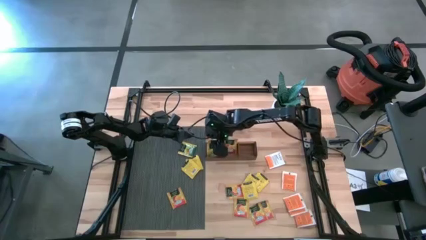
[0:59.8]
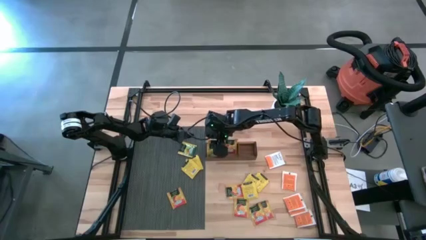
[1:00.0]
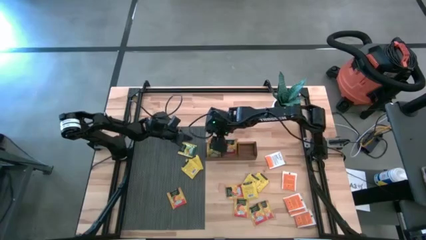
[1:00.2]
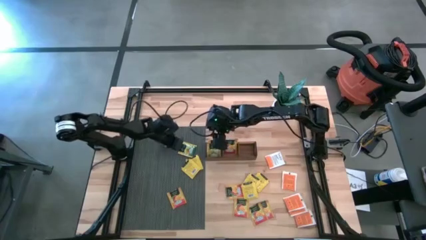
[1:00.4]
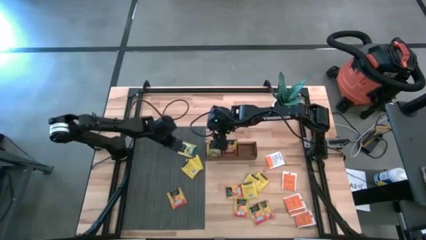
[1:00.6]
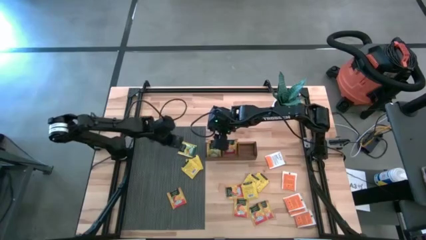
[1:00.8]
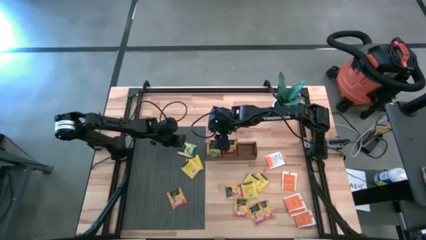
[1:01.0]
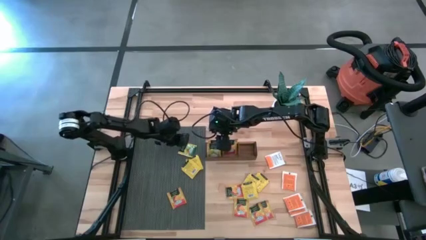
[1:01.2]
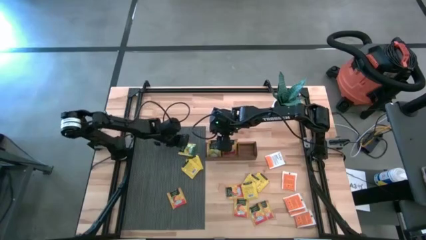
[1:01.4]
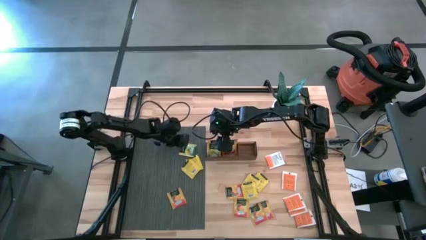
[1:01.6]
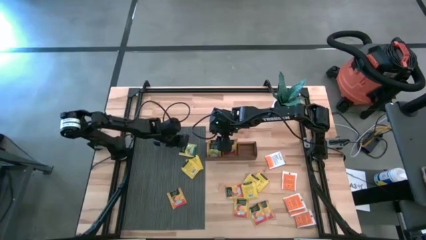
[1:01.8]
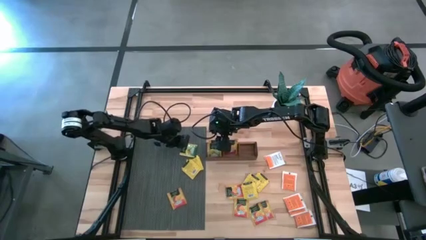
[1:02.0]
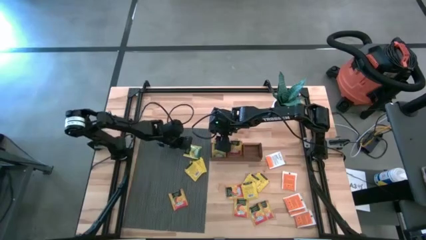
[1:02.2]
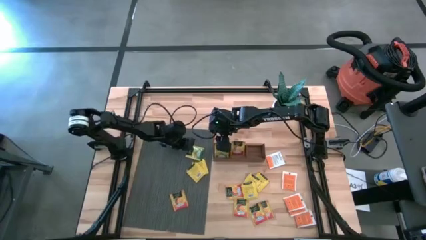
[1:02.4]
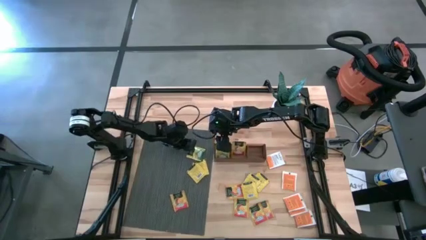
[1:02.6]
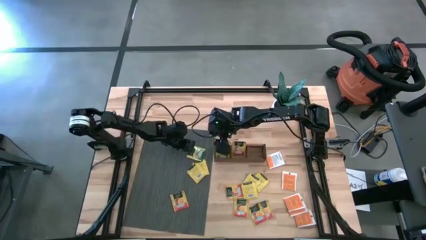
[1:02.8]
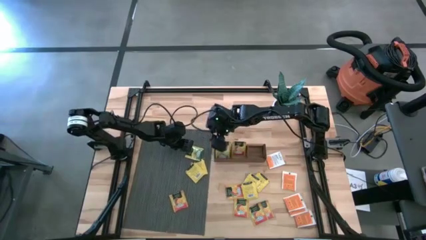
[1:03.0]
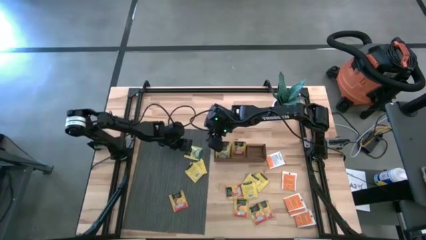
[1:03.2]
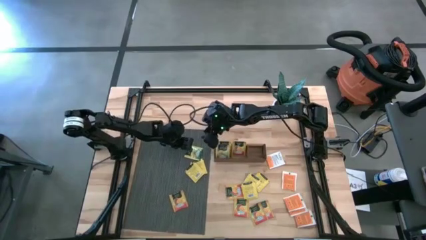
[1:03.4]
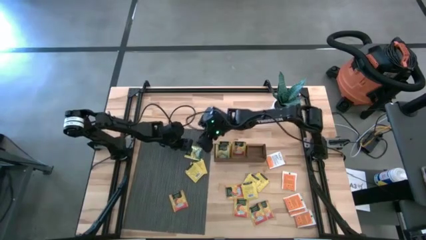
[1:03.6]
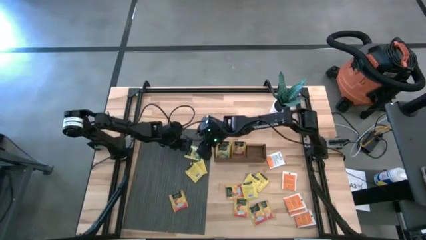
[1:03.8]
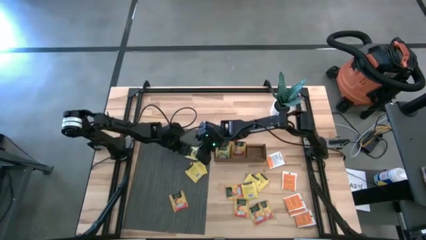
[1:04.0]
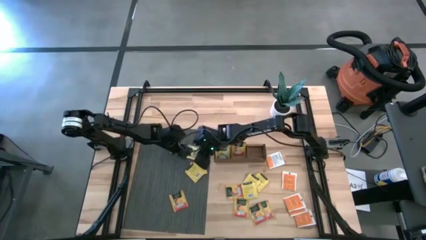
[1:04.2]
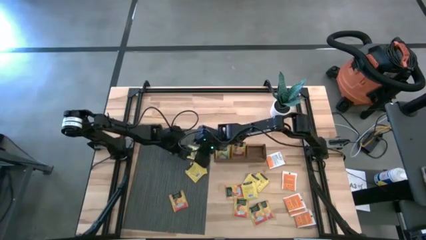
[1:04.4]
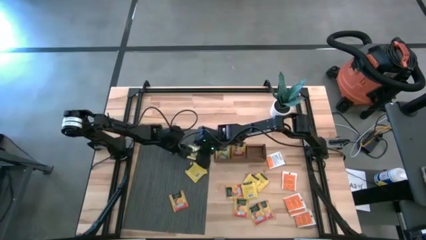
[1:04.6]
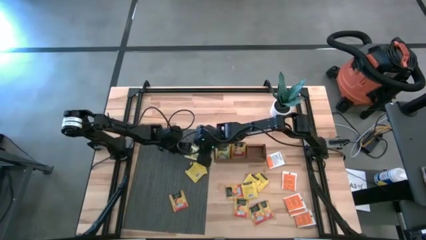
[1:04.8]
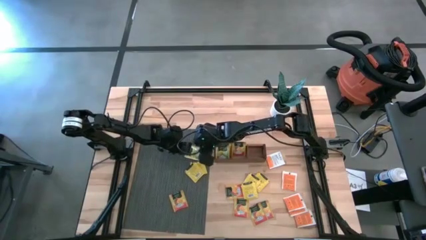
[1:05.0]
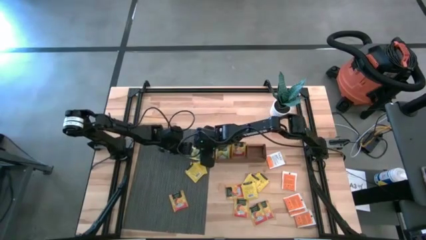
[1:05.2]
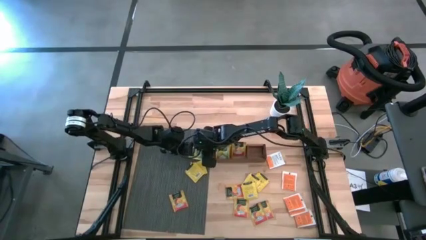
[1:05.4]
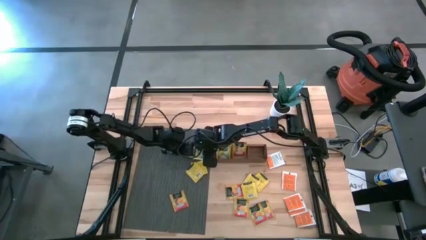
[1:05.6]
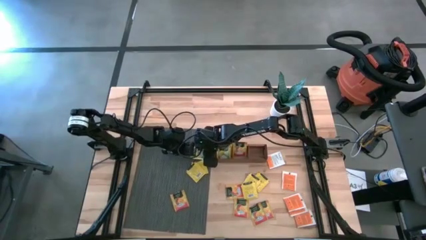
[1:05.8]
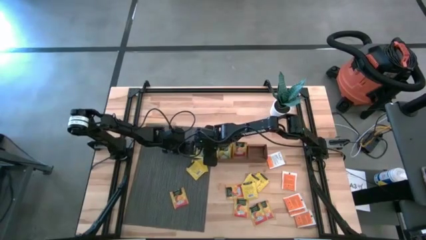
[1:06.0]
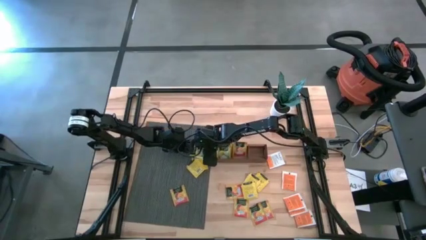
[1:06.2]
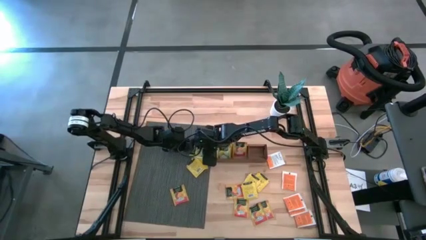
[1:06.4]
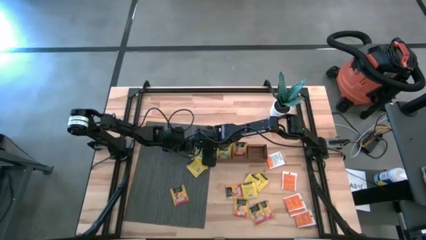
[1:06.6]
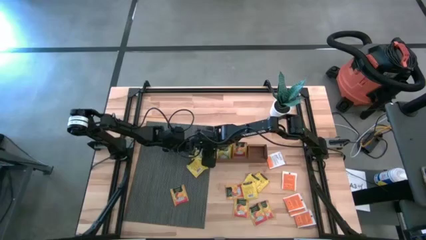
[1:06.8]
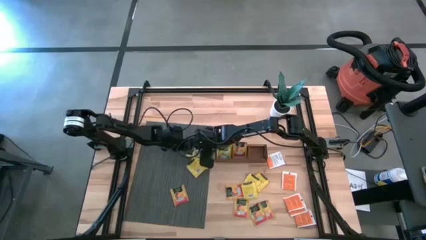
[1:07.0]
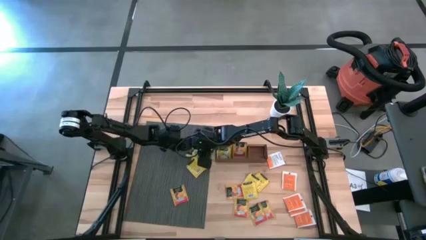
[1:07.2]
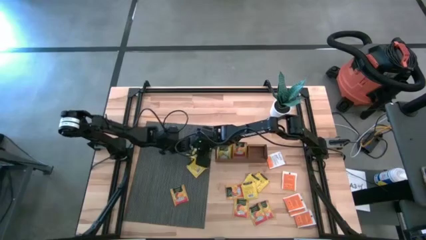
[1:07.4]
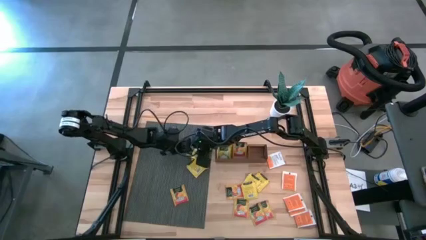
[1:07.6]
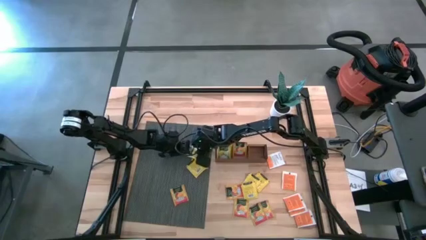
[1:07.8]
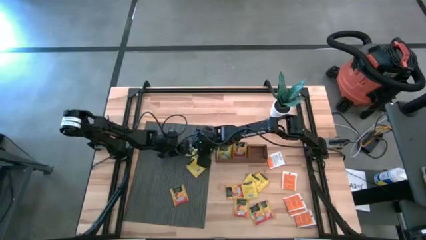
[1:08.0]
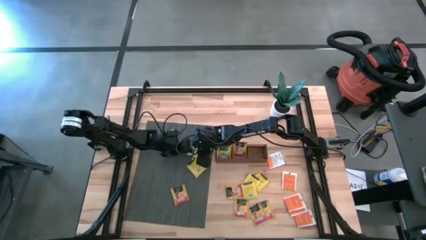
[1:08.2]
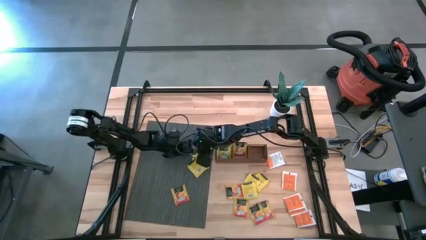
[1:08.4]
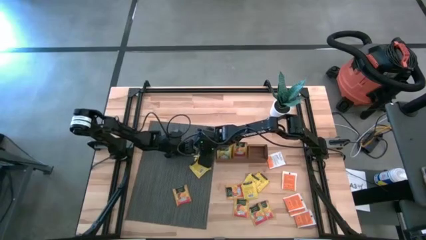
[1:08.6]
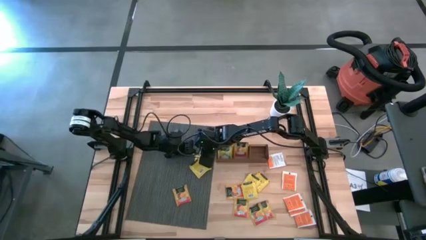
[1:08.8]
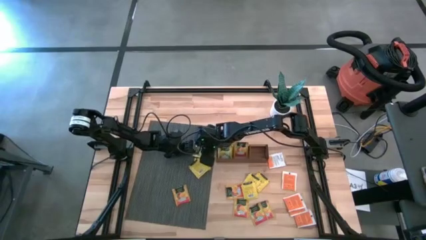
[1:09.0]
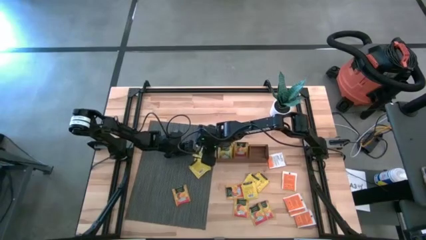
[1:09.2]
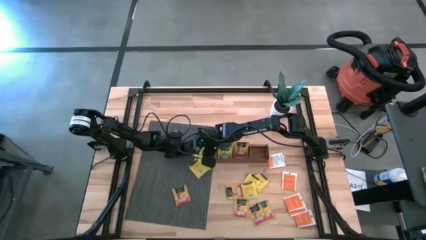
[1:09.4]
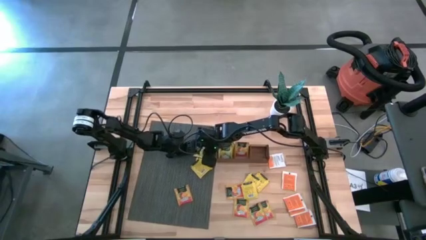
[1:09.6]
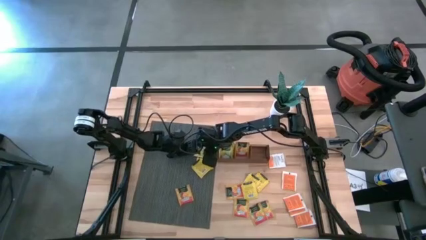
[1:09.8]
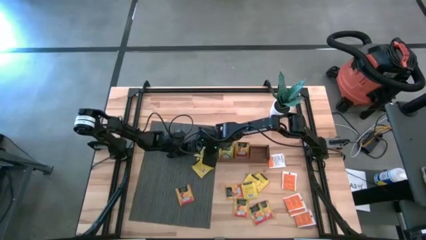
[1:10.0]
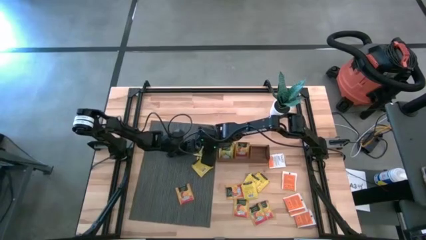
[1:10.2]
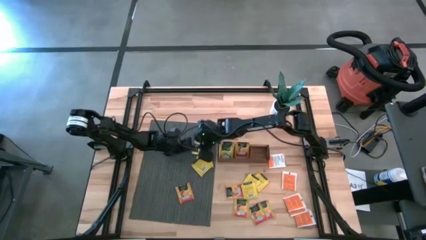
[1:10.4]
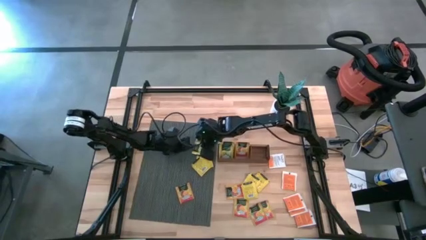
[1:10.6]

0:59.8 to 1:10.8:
Task: Pick & Place Tea
Put the yellow tea bag into the middle section of the wooden organizer

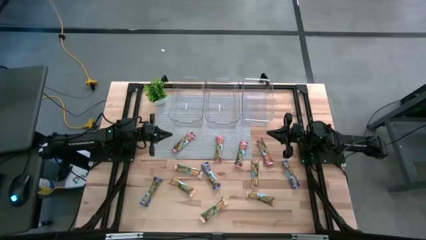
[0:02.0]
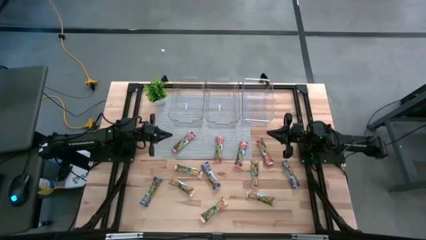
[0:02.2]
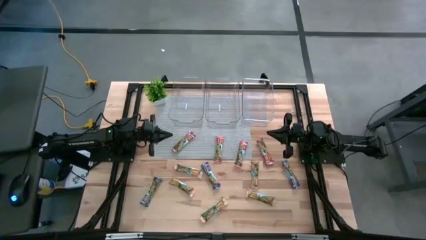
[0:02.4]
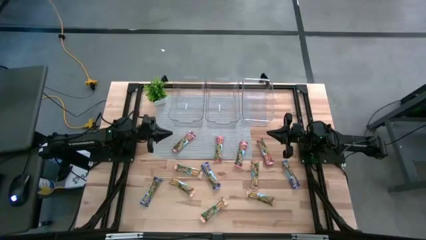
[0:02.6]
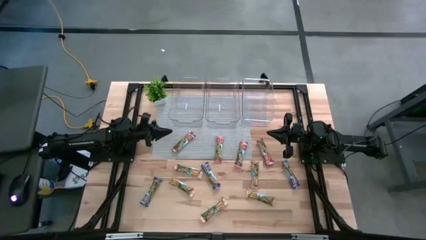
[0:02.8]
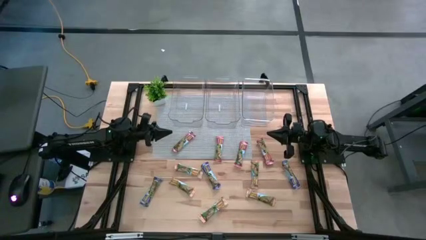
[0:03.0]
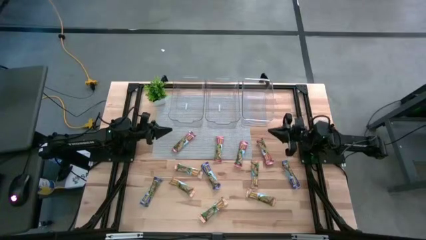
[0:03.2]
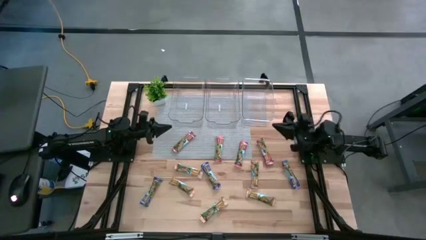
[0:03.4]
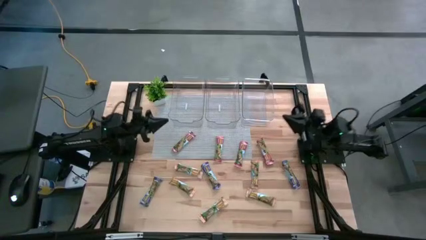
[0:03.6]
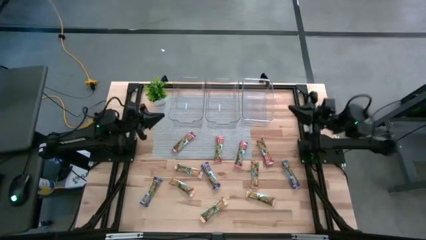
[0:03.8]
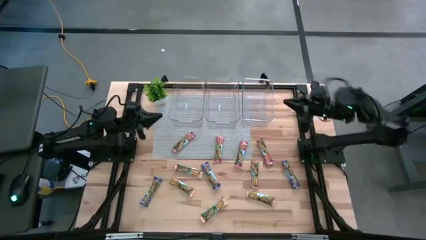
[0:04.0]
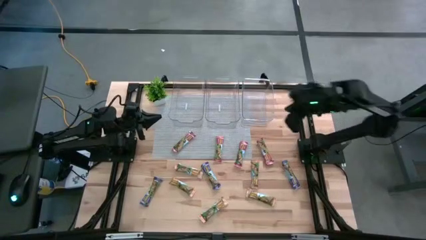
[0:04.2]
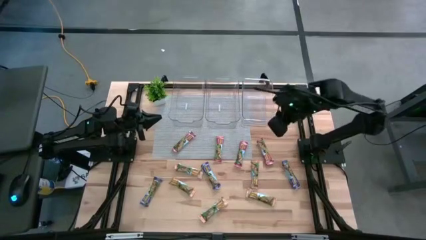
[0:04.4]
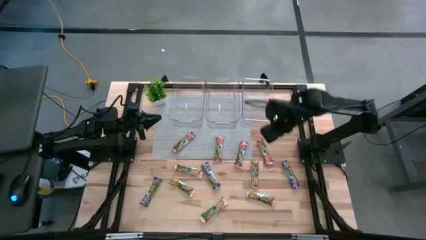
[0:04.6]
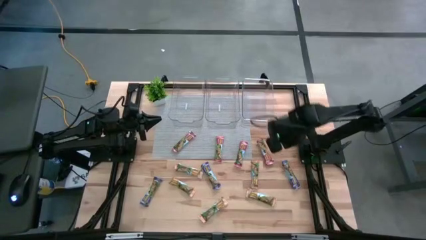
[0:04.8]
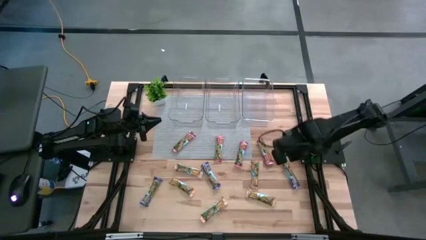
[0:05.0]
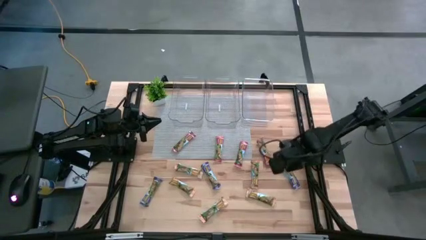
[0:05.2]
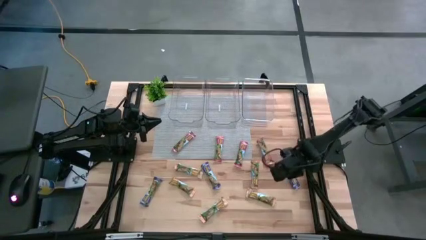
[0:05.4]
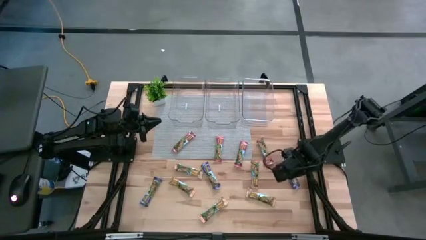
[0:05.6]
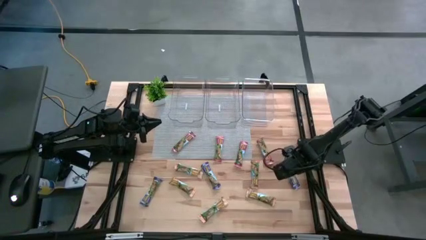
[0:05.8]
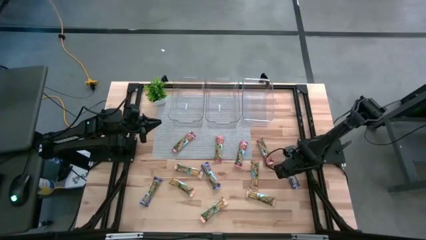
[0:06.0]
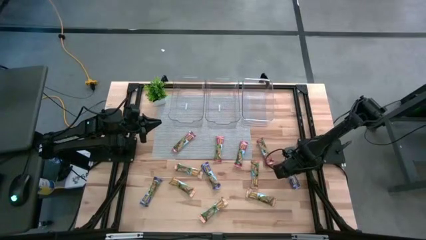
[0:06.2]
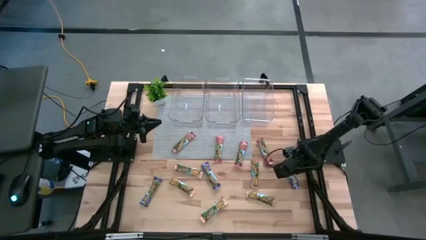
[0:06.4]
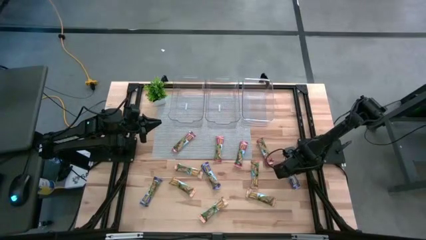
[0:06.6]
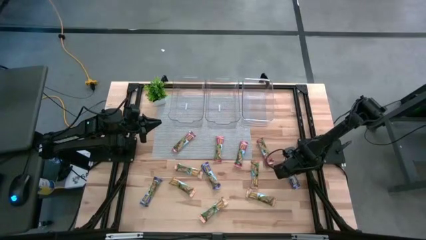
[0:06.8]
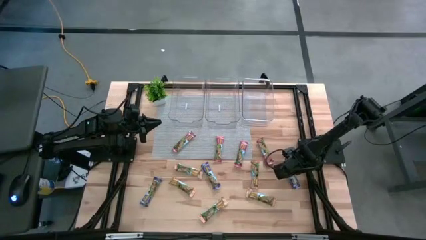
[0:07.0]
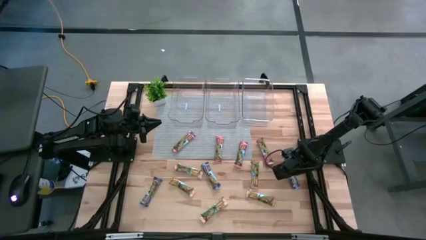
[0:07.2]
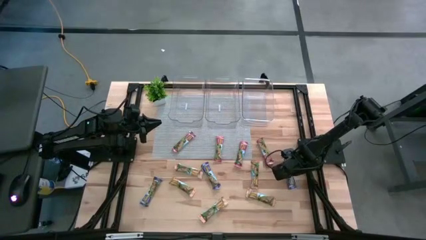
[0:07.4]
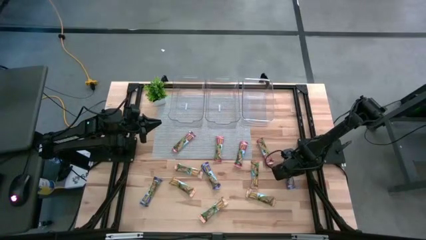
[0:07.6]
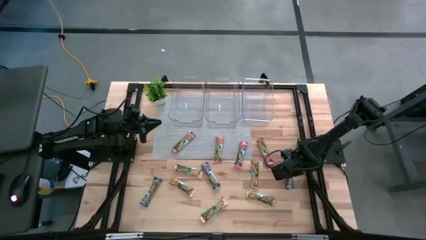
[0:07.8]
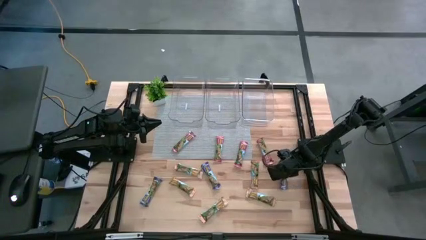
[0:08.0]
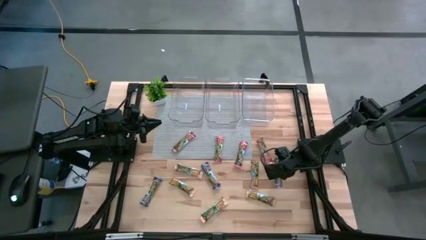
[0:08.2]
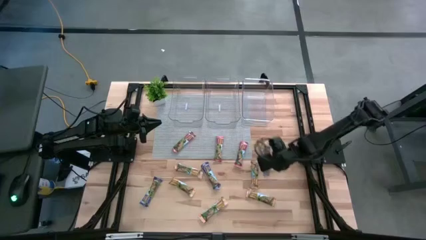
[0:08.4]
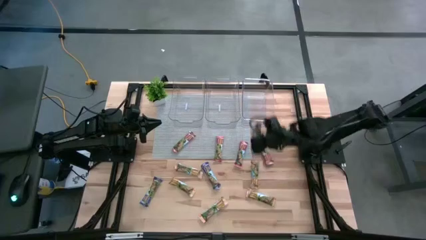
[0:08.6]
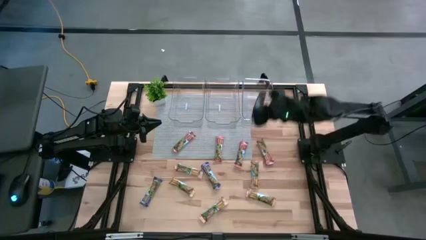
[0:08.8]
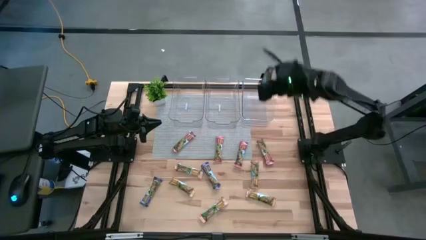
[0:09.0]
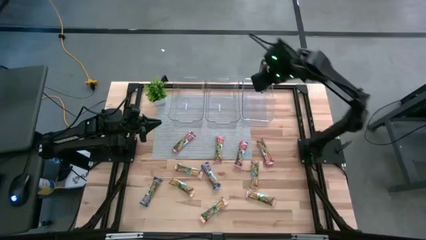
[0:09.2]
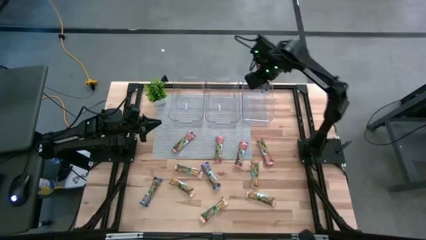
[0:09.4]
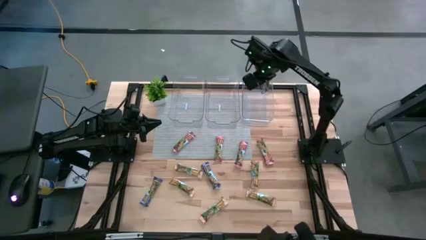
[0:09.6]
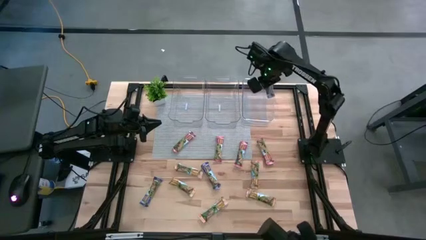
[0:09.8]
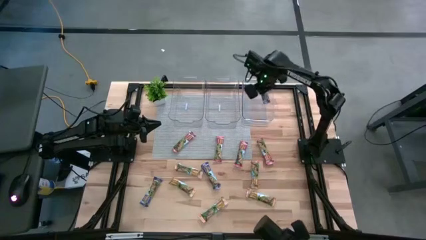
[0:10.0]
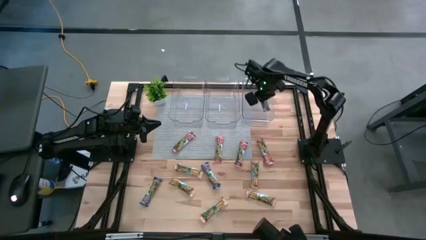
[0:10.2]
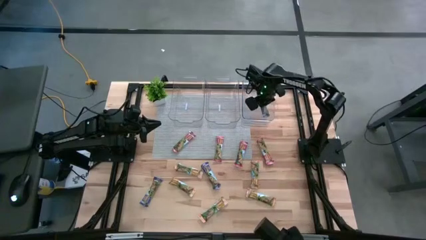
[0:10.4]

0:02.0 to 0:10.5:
Task: Pick and place Granola Bars by type
Put the blue granola bar into the right transparent bin
